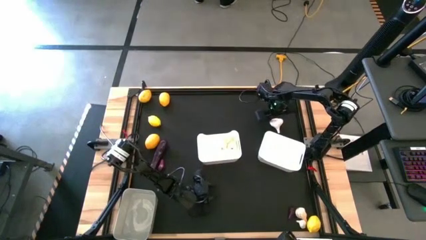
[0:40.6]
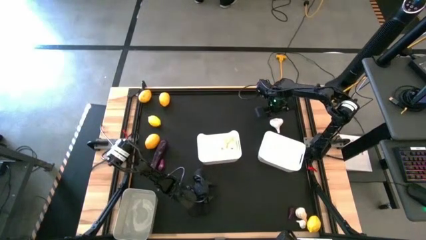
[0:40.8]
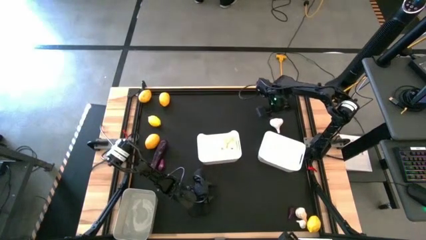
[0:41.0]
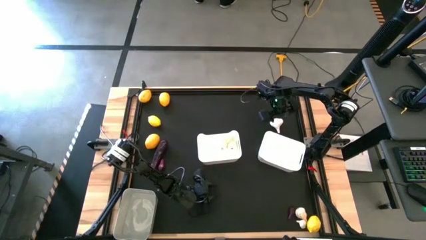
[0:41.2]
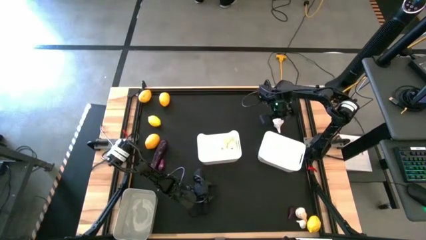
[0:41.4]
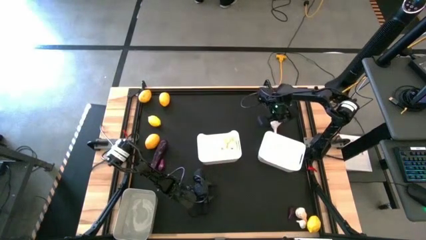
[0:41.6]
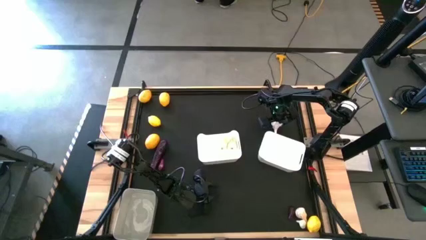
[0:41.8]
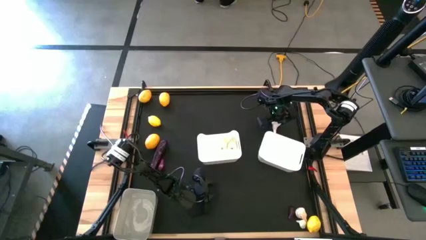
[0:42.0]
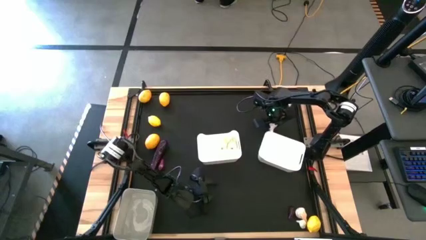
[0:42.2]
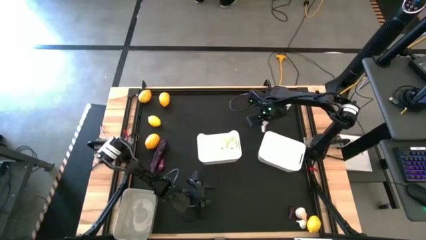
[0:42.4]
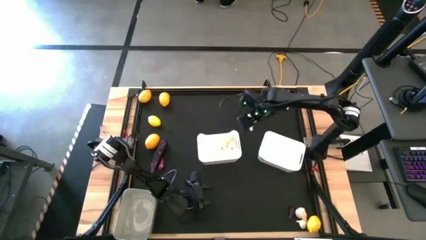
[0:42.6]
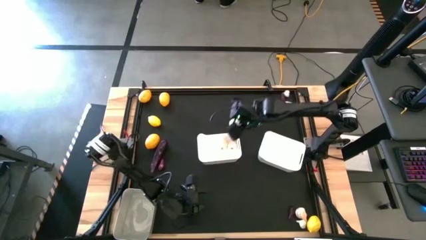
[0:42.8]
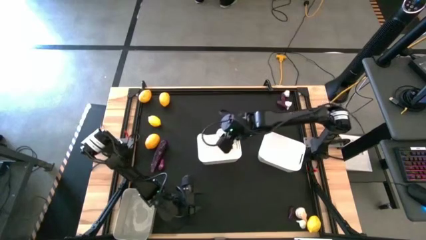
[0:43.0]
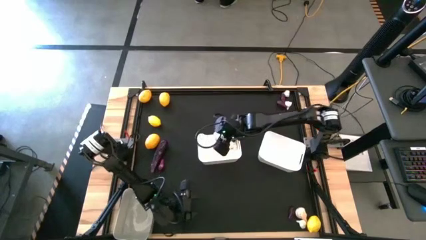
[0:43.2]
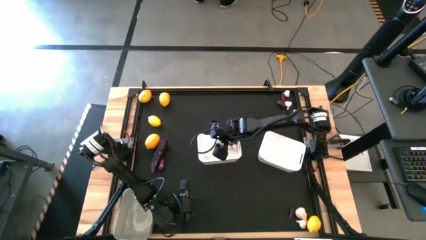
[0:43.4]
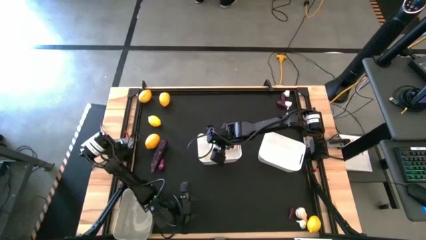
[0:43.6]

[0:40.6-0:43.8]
Task: Sort produce into baskets
Put the garlic into the left white bin

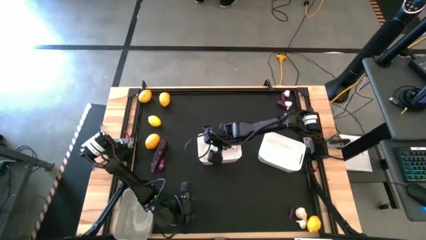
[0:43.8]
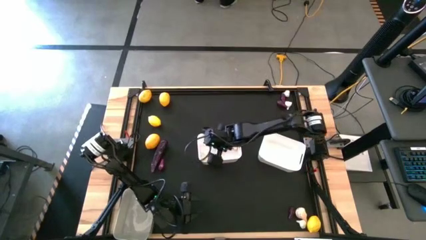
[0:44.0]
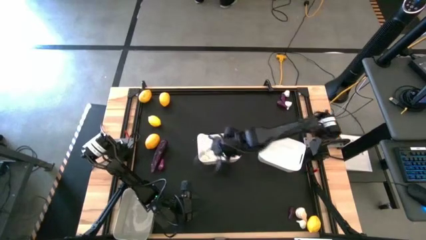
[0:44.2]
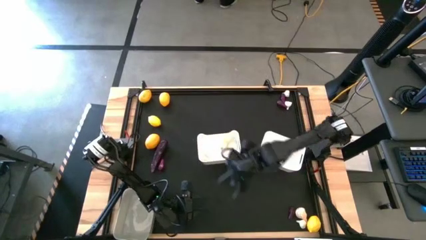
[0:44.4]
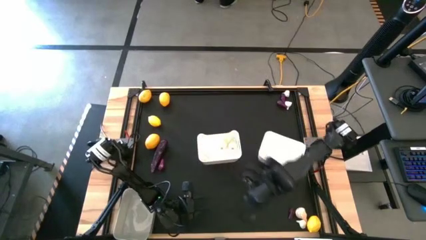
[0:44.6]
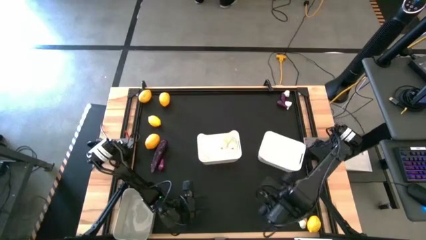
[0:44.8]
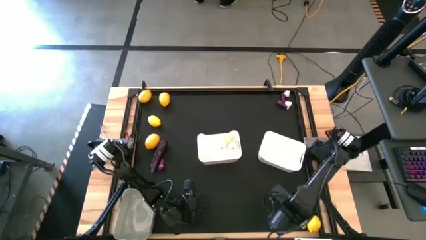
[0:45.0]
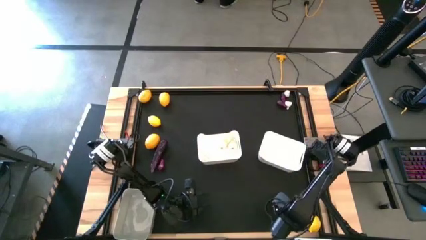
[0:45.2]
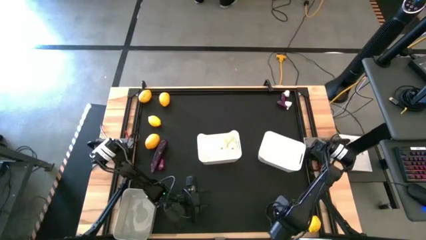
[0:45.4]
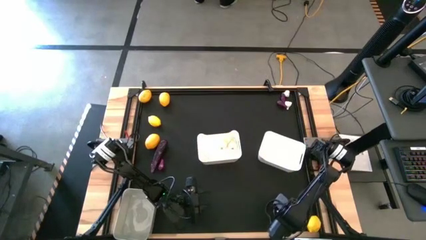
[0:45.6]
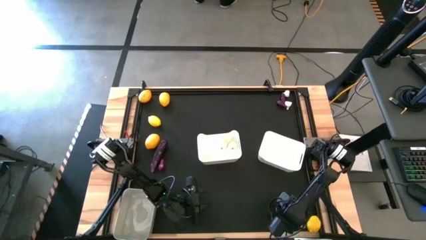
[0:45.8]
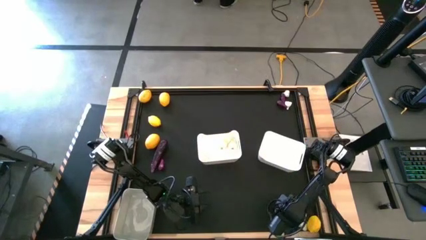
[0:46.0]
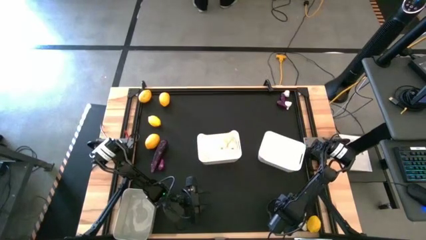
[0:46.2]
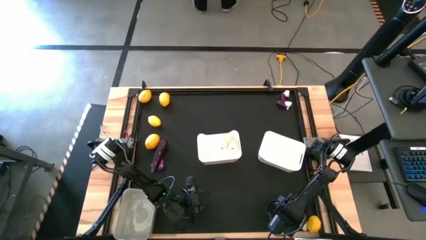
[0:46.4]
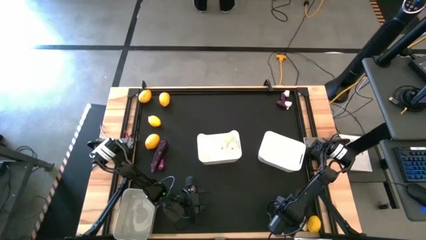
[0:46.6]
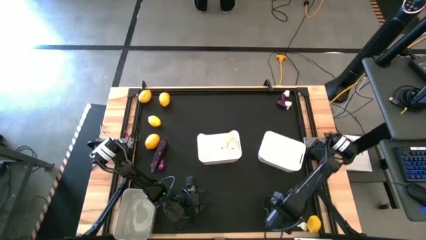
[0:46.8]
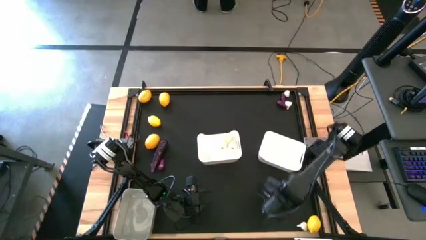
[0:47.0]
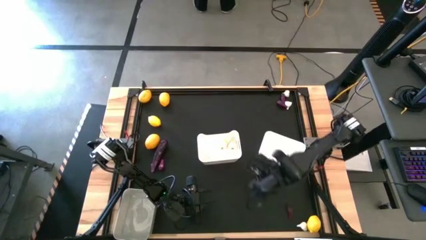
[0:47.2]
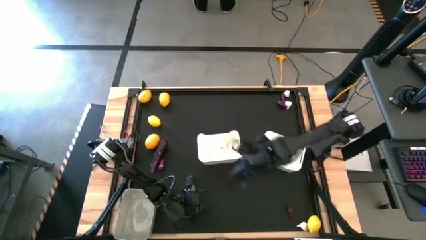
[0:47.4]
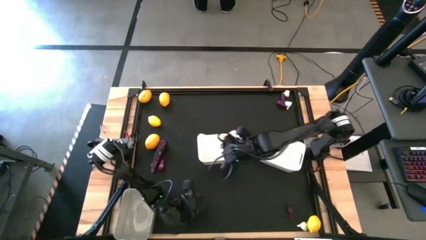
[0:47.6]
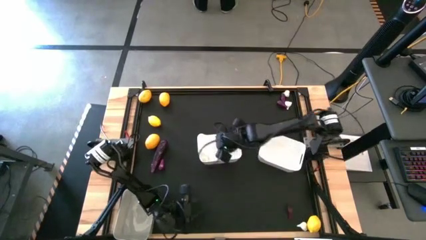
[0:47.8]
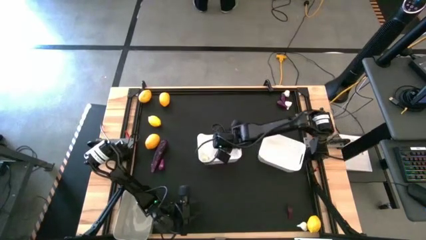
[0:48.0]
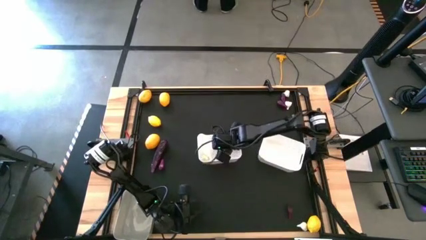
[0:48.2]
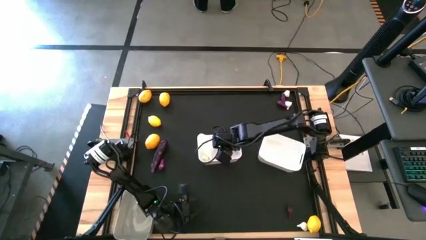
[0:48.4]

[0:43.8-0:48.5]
Put the garlic into the left white bin

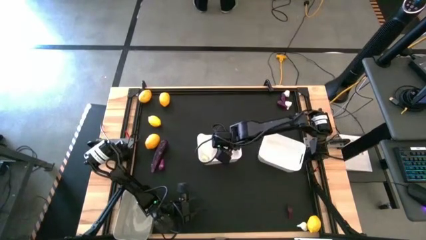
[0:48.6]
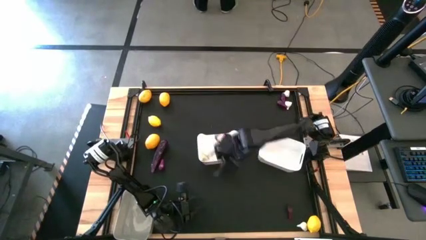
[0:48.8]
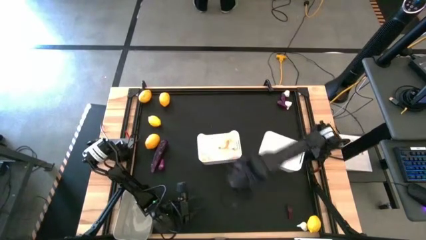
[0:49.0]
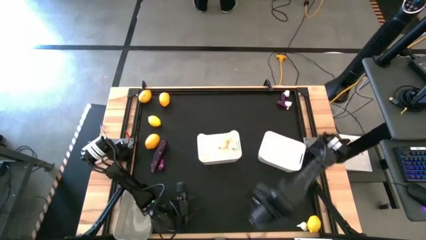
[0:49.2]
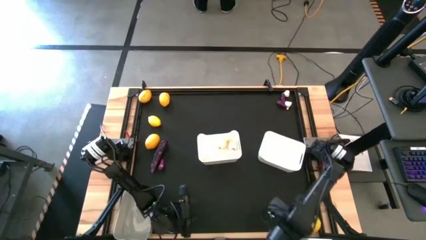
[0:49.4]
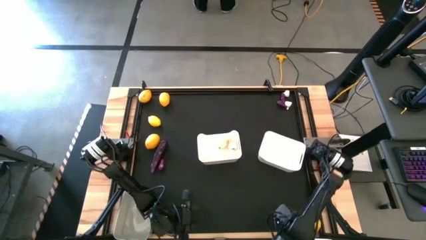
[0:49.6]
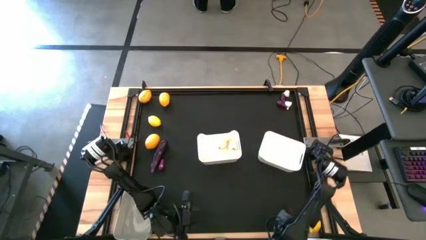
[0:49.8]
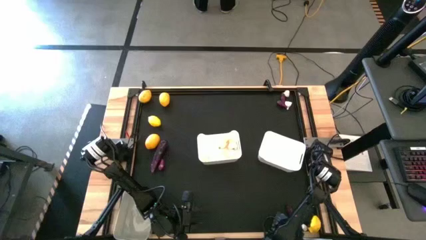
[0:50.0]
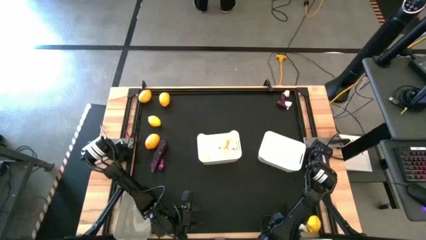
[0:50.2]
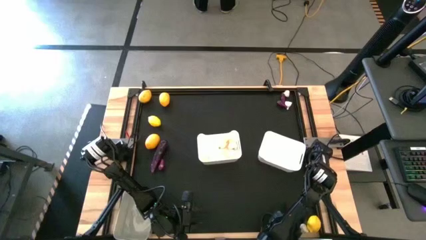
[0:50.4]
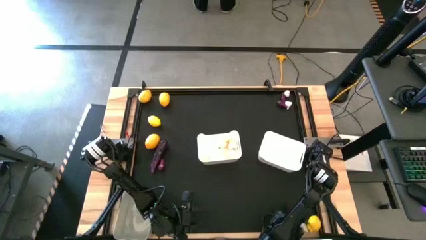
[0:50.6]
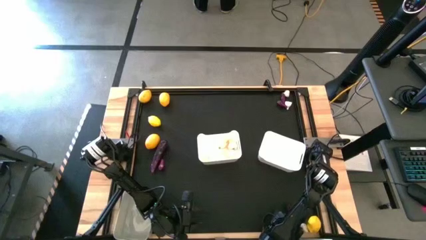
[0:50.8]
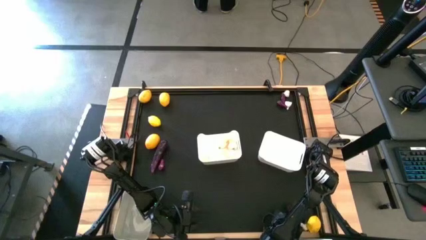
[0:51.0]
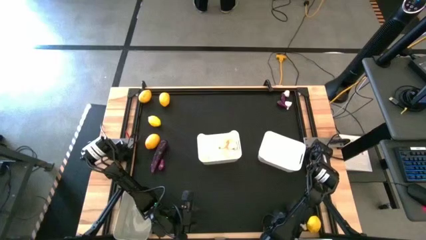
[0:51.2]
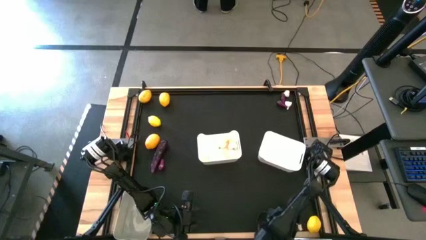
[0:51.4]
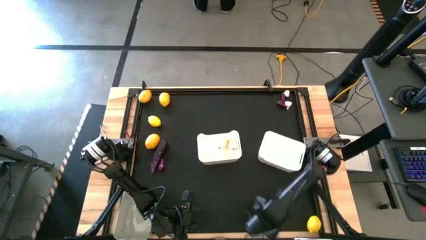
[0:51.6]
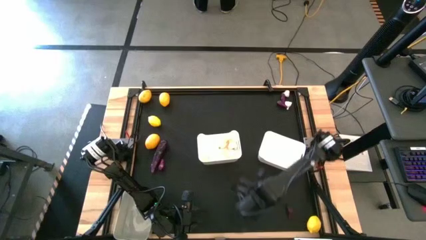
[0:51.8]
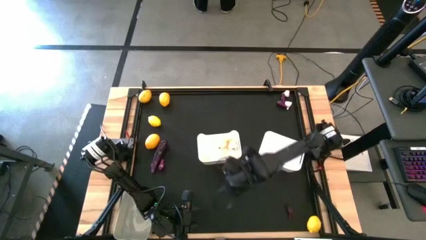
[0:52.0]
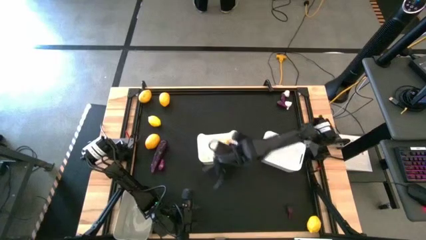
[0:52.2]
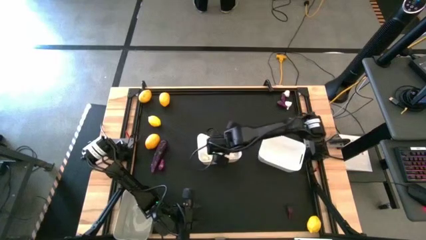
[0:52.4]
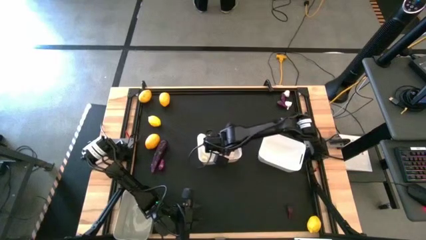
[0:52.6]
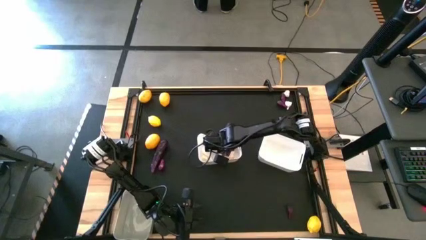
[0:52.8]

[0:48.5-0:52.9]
Put the garlic into the left white bin

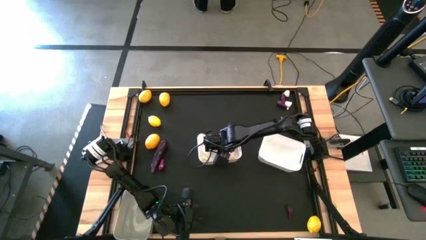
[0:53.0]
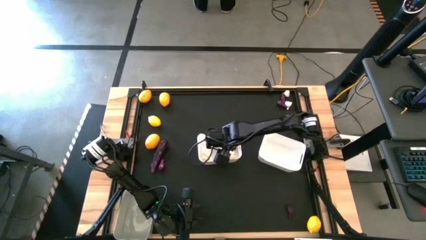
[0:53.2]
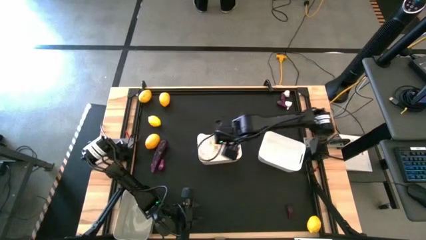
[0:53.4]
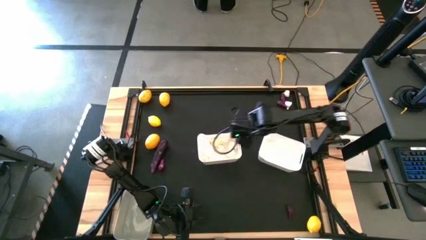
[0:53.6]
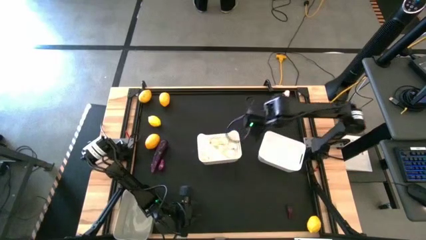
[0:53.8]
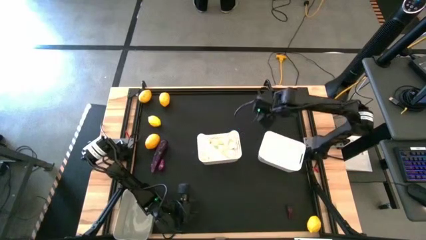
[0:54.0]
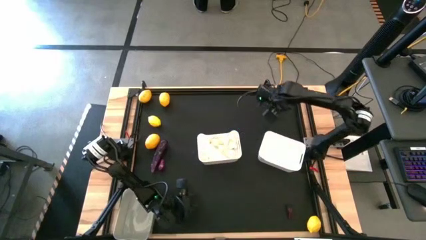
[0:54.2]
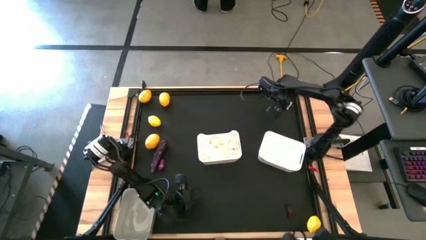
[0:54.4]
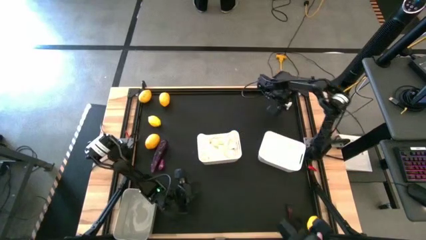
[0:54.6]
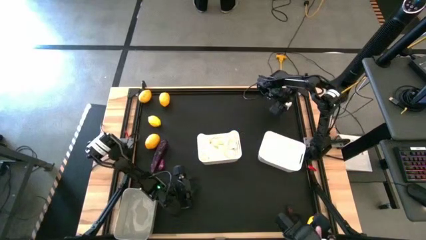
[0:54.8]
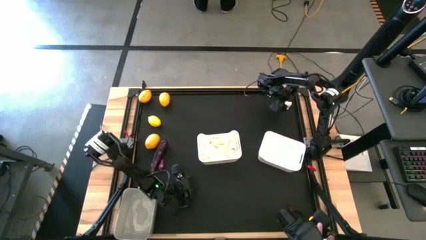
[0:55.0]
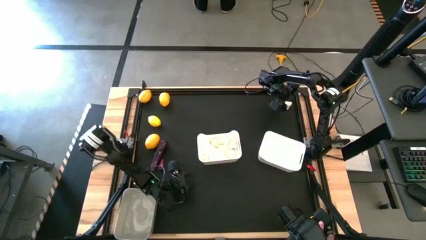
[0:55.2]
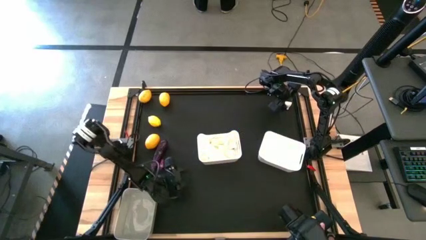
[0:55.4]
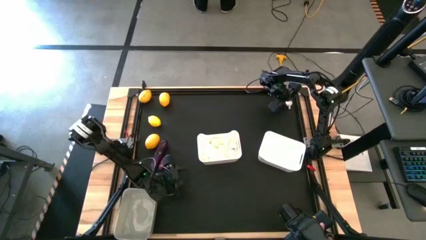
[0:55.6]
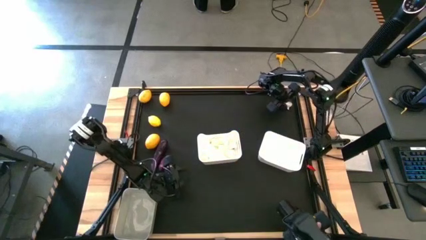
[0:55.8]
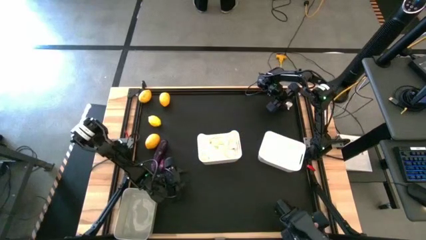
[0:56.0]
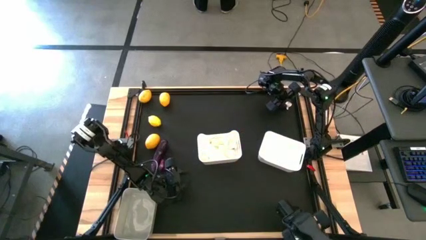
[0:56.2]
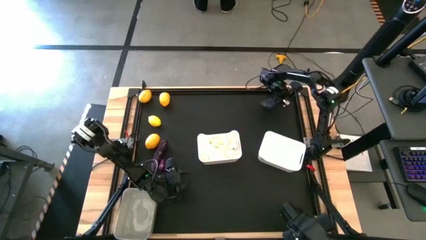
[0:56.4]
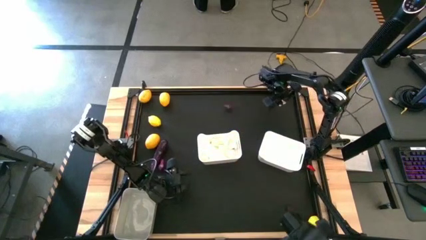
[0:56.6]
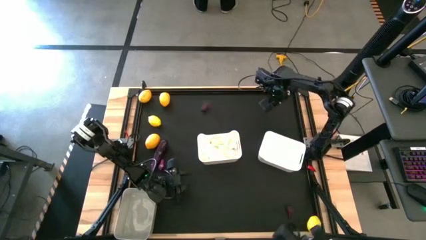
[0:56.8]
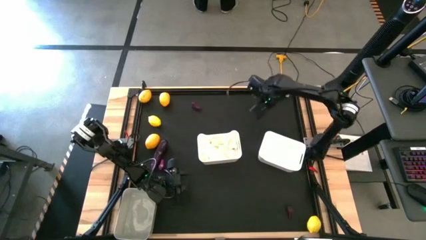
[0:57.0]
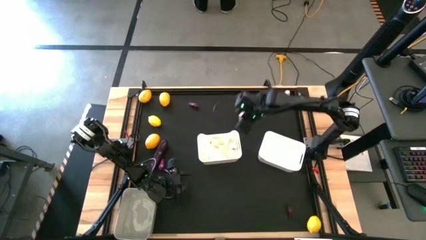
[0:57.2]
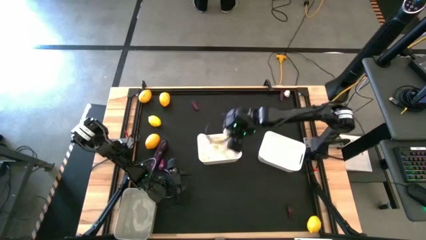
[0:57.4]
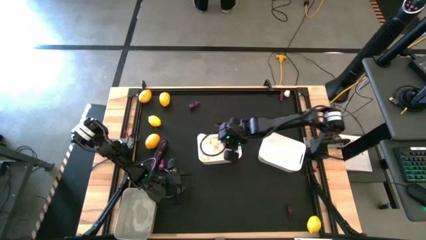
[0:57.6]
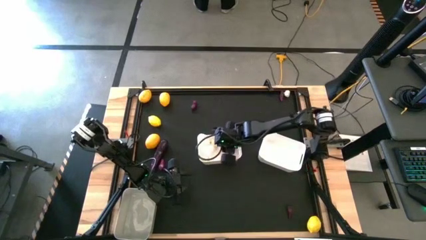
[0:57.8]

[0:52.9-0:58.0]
Put the garlic into the left white bin
